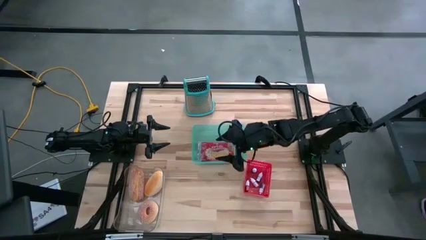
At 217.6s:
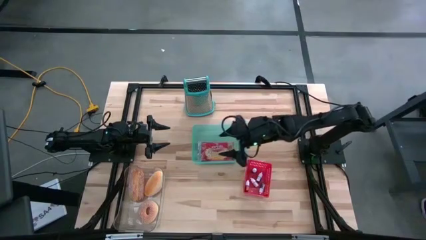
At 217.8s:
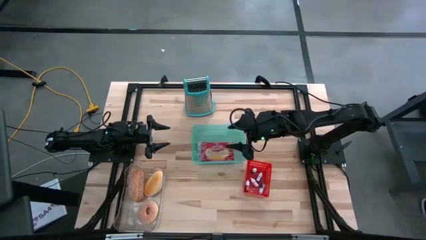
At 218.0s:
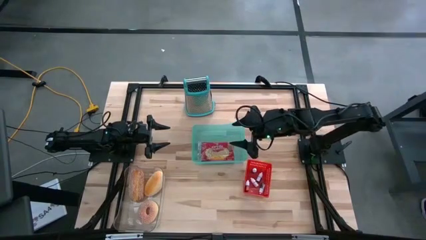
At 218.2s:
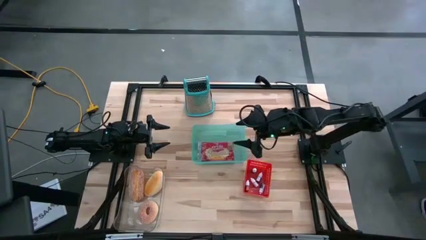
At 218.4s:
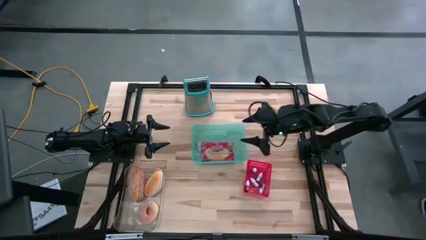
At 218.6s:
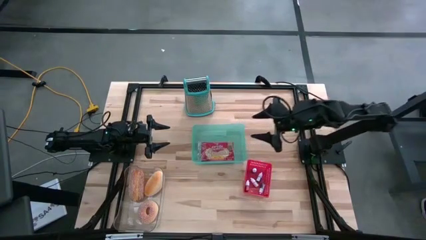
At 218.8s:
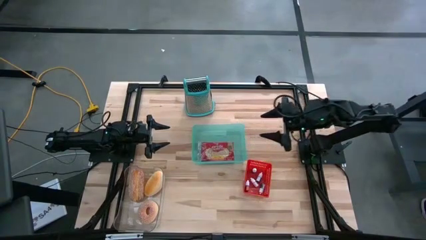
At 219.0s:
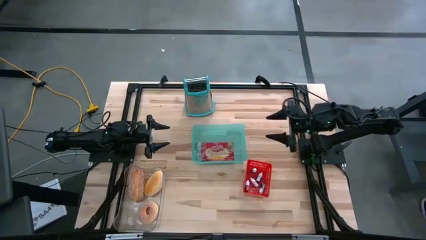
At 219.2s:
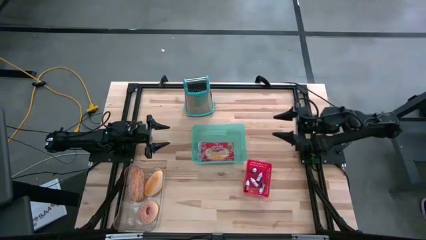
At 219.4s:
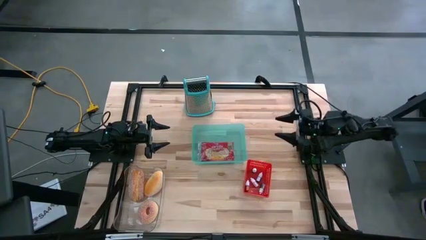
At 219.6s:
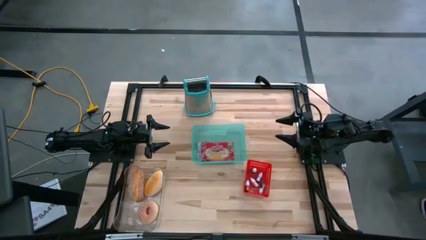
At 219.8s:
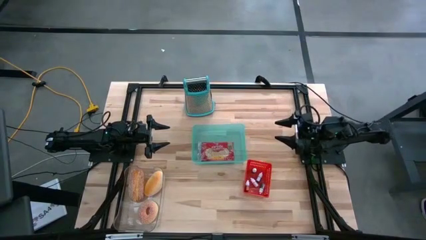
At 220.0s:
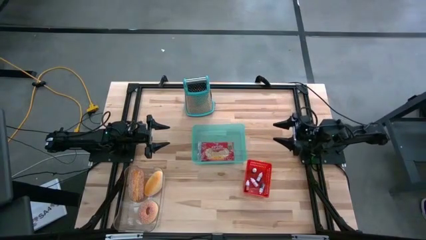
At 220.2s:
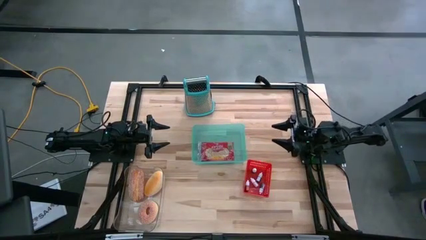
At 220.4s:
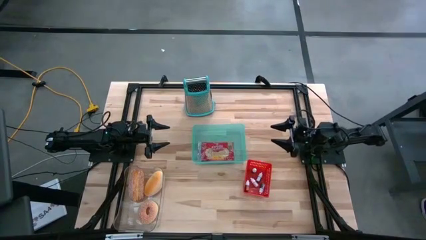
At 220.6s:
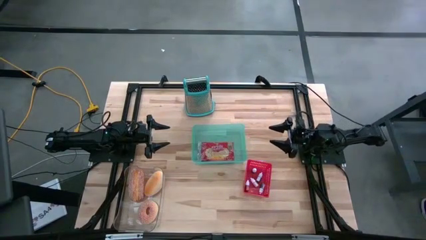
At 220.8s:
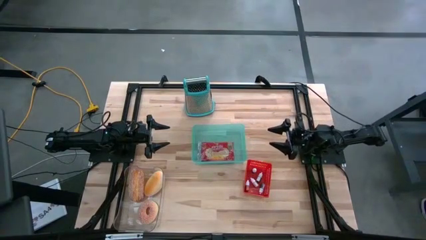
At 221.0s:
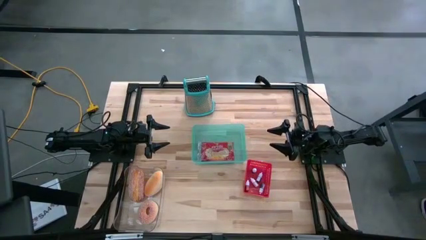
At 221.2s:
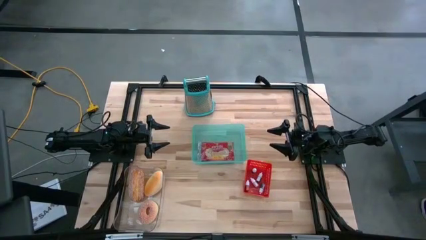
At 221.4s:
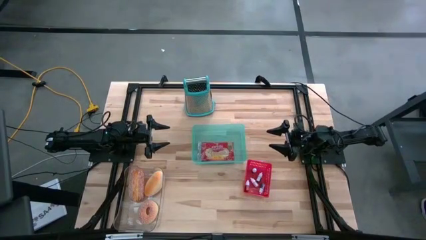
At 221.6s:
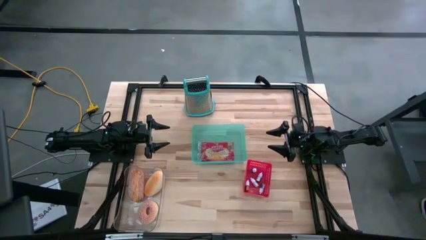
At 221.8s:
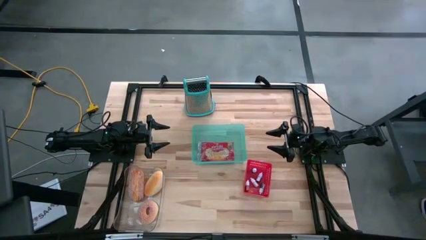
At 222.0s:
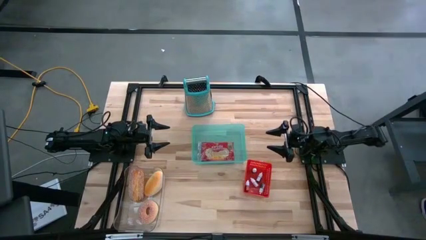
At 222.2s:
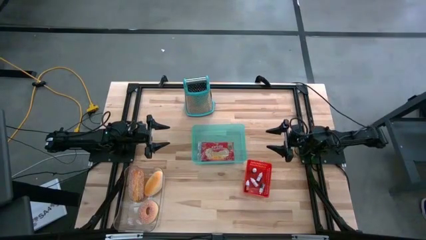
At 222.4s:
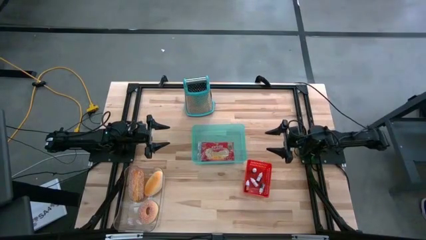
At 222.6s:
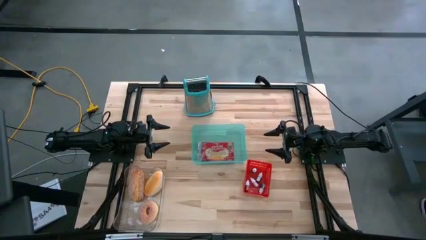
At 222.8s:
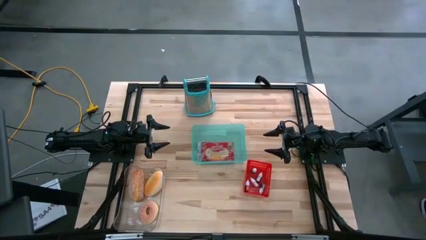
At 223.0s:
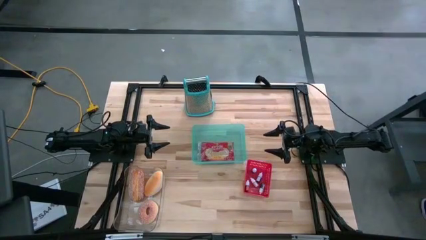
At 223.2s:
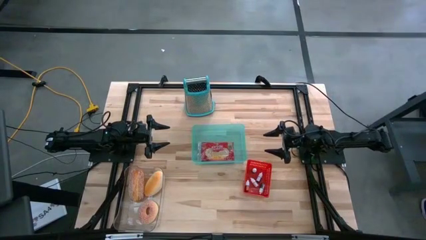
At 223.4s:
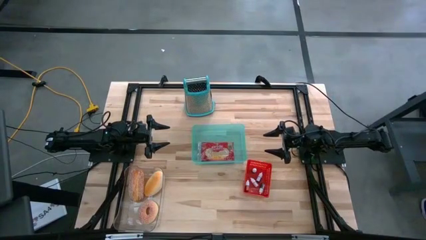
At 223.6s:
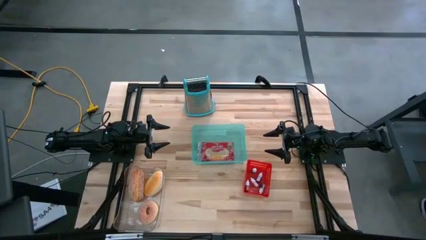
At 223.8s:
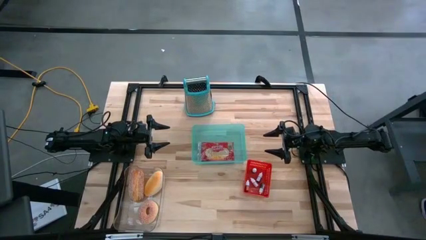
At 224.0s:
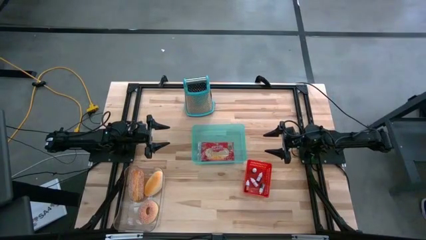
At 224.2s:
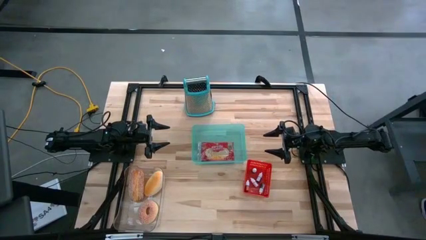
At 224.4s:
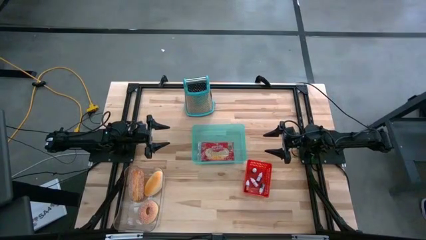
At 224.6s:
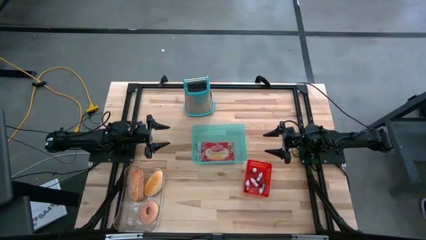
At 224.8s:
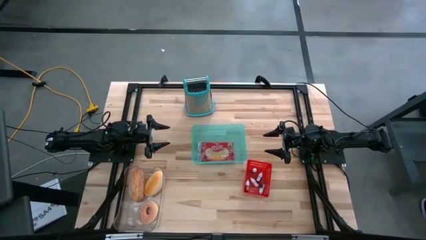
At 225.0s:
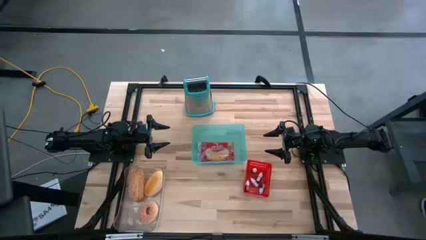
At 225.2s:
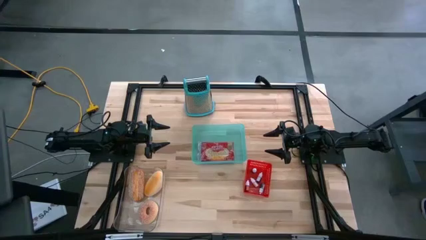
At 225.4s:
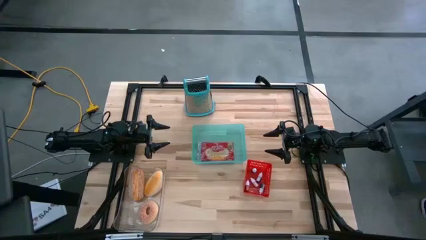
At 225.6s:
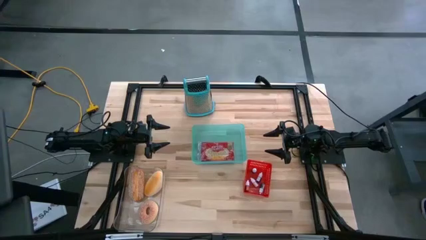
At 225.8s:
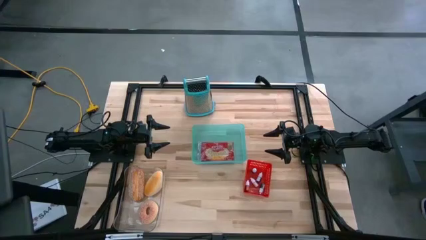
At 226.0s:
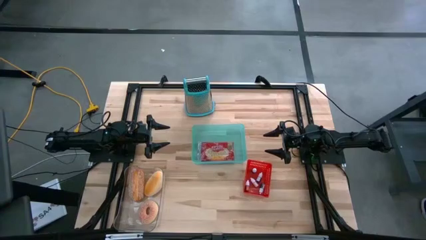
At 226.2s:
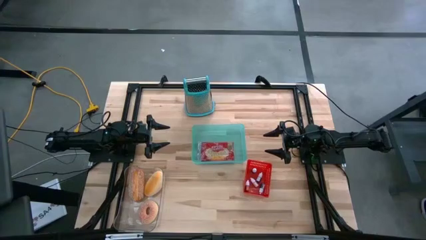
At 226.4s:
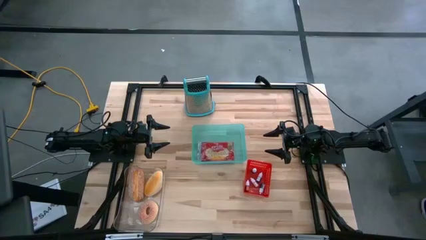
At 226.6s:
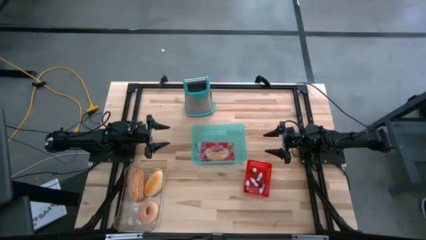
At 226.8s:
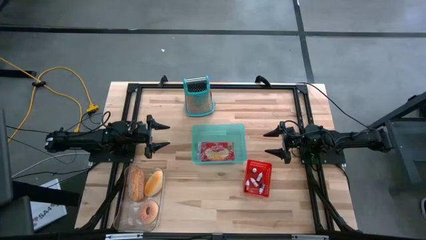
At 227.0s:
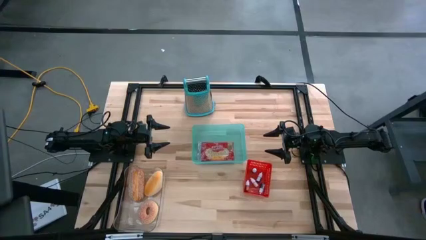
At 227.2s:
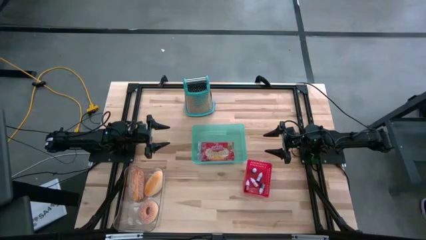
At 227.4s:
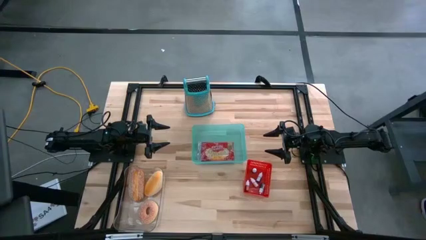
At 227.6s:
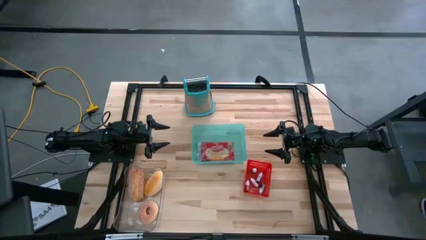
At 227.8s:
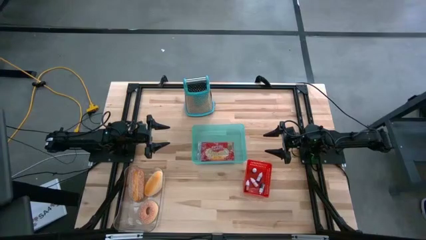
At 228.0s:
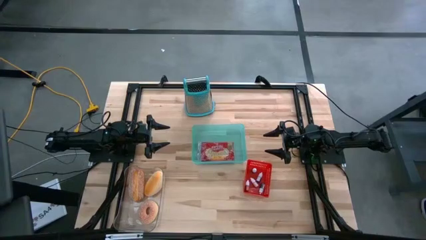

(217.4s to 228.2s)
Task: Pick & Place Food Item
Return to Home Position

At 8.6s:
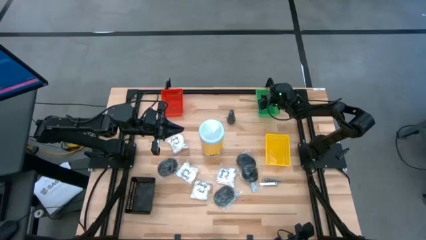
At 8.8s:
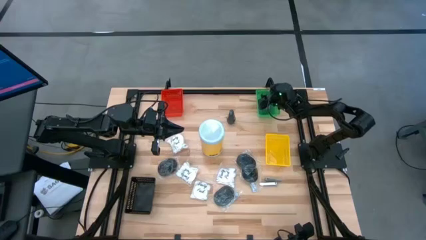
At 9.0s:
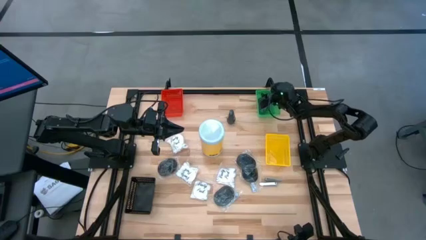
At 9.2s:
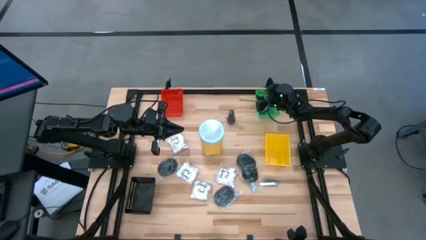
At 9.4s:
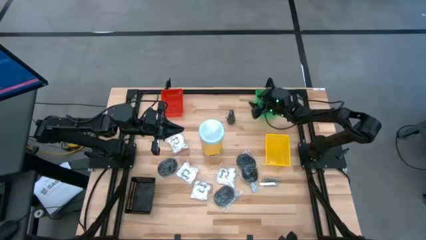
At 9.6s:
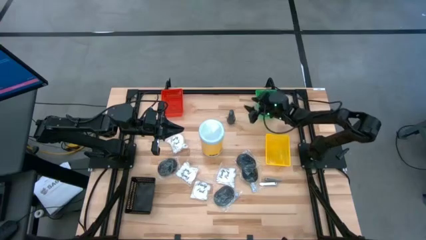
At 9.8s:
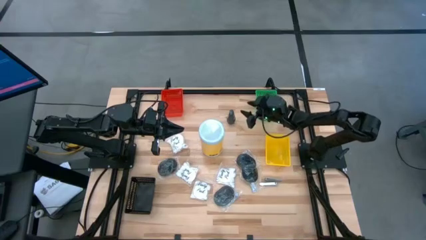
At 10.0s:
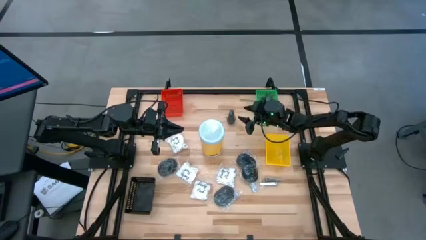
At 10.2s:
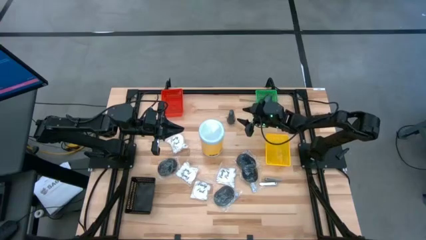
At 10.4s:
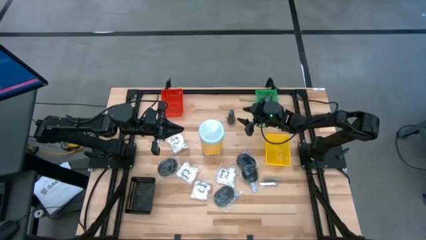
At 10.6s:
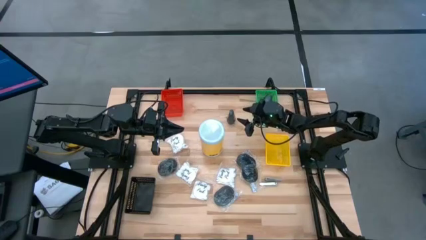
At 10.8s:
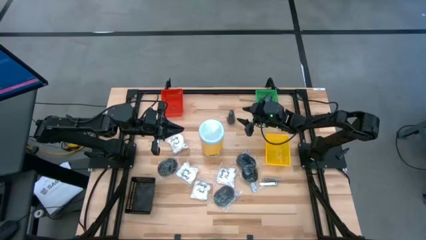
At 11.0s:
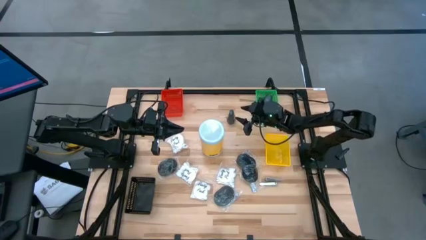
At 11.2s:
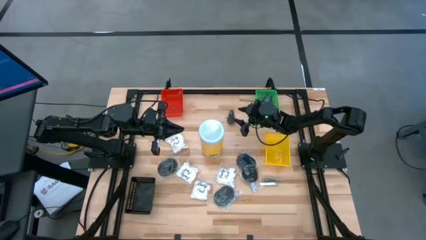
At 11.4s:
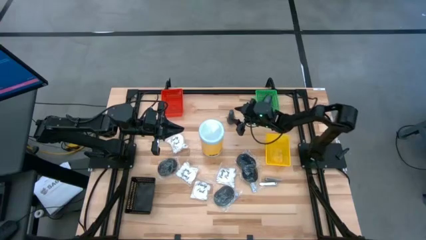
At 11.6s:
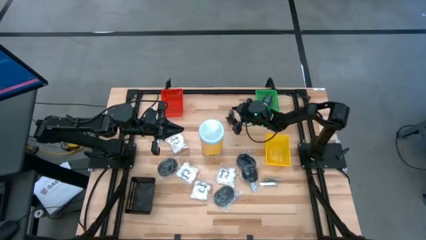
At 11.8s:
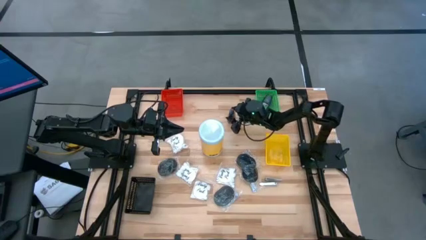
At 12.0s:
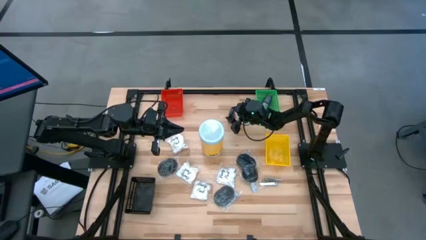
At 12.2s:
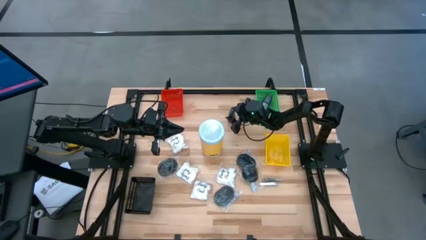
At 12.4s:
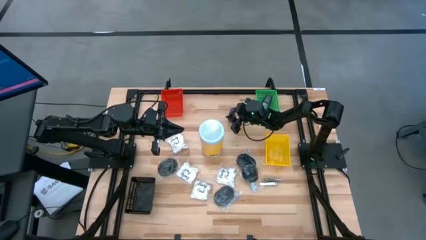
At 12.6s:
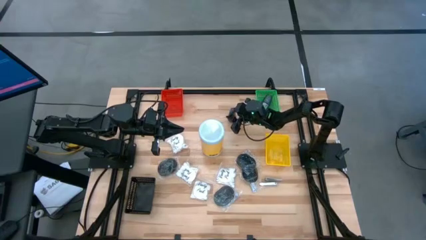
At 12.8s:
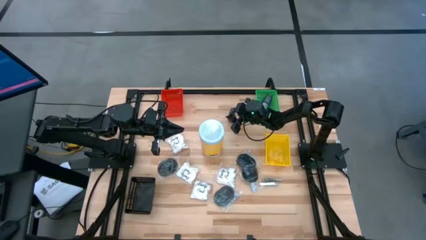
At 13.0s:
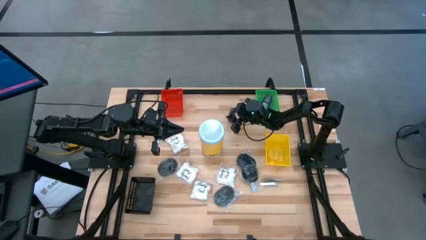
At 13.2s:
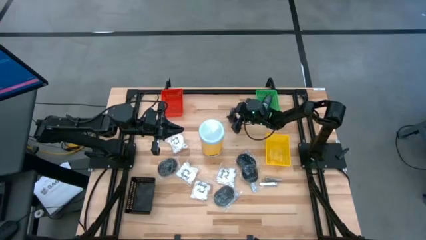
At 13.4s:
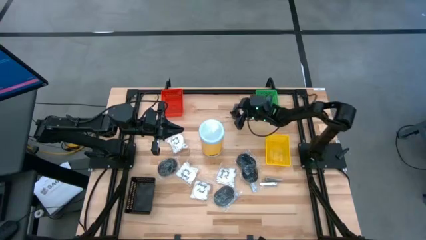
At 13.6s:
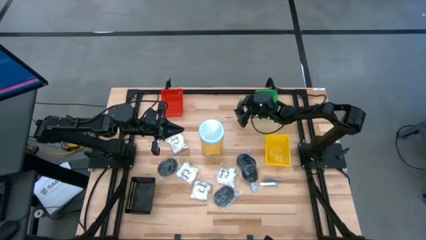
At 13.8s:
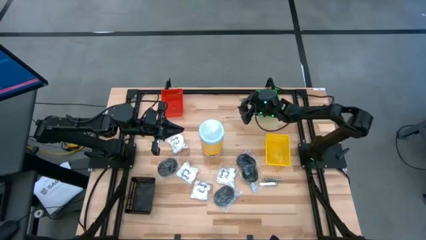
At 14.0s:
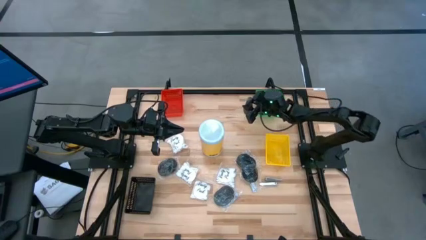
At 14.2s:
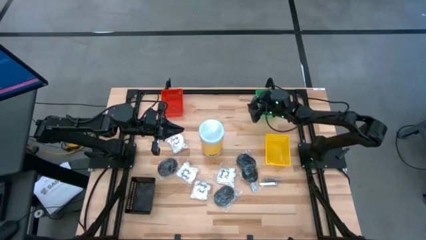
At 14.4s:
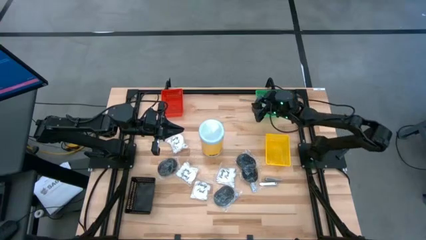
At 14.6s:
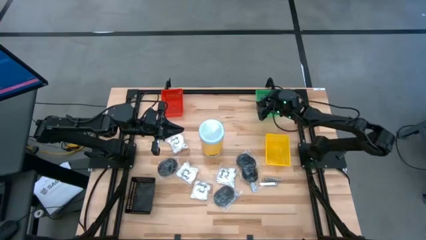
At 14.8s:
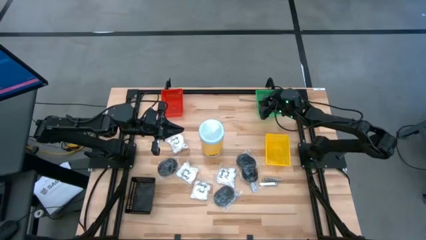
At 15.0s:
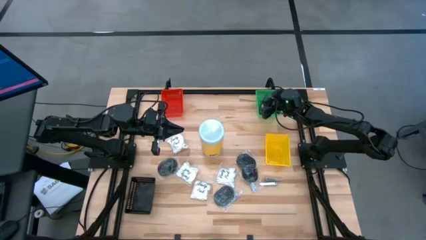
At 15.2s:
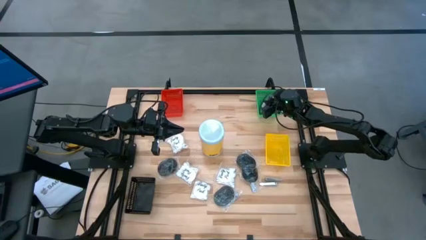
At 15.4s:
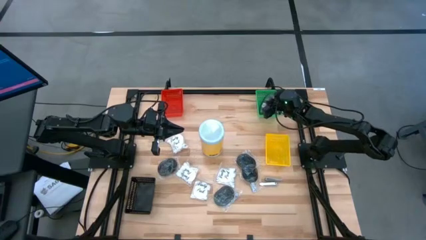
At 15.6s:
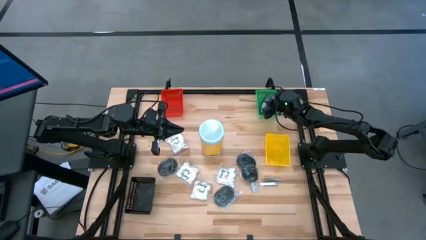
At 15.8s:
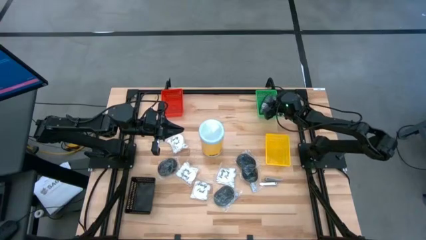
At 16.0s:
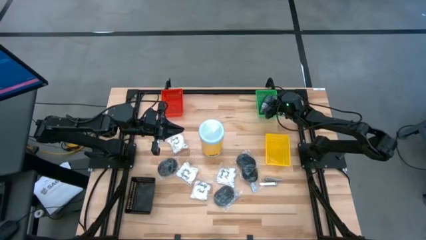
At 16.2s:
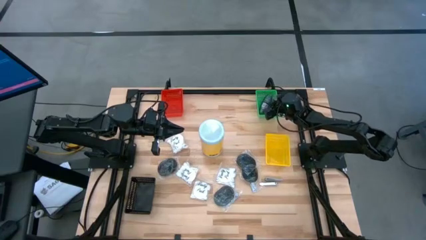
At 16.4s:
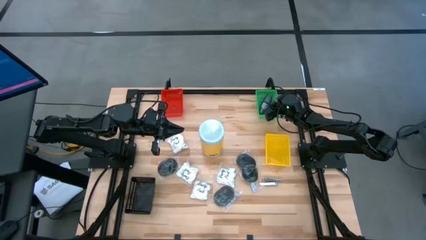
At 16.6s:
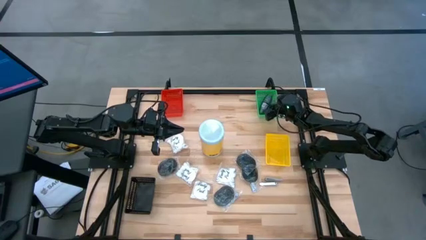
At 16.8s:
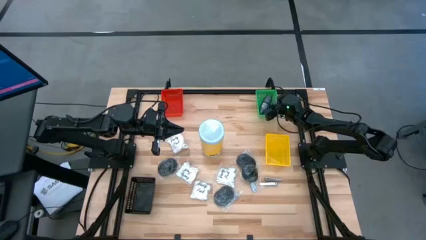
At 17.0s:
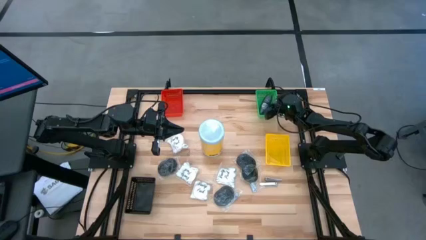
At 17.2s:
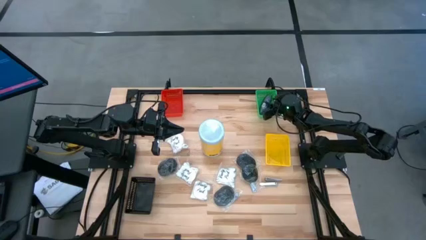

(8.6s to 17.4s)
Task: Pick & Place Travel size toiletries
Put the black deodorant into the green bin
